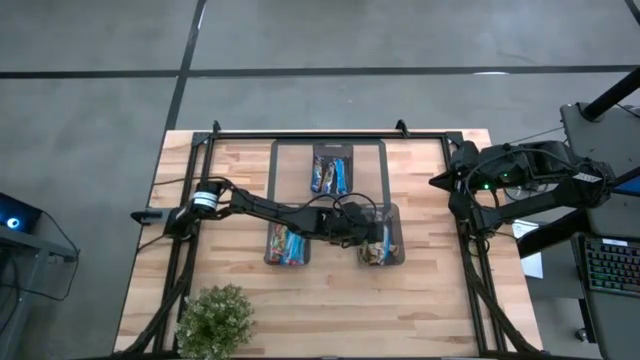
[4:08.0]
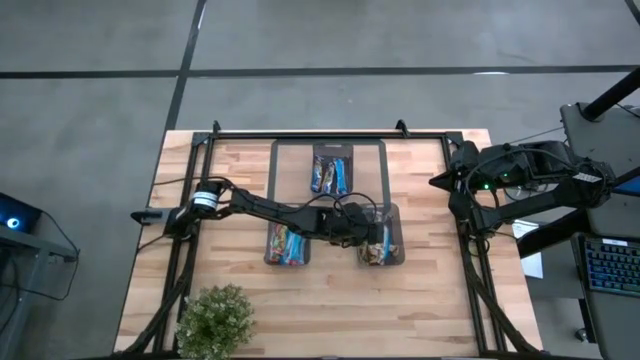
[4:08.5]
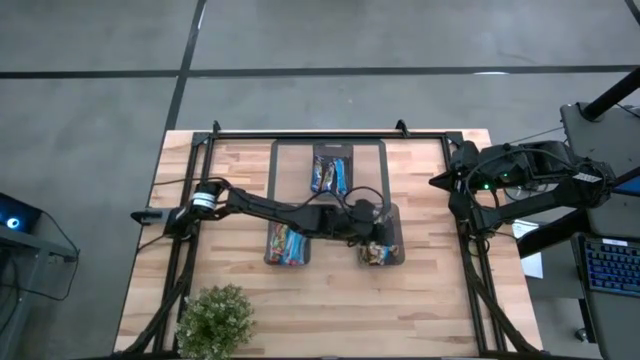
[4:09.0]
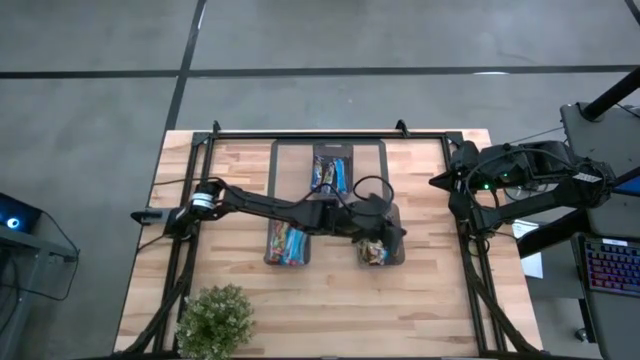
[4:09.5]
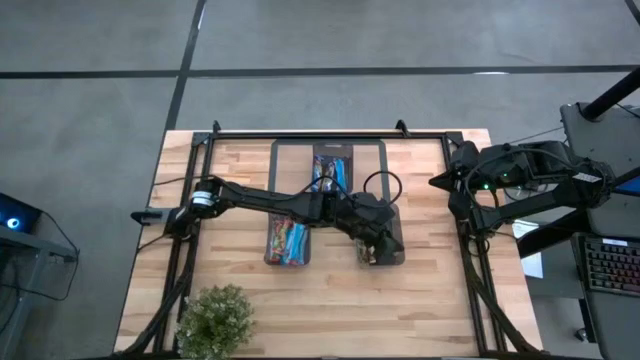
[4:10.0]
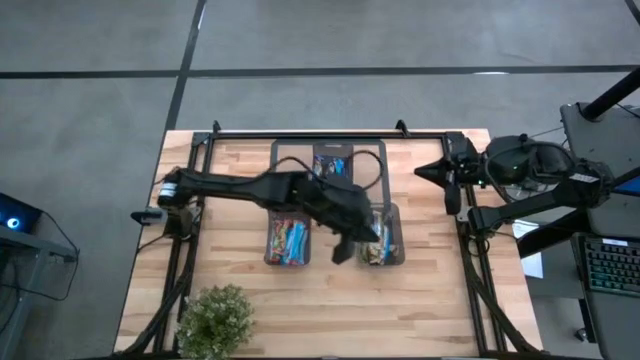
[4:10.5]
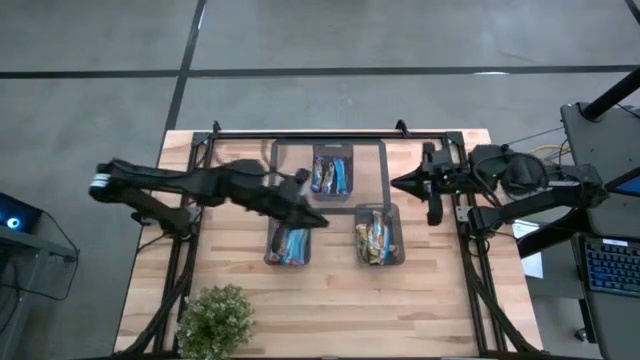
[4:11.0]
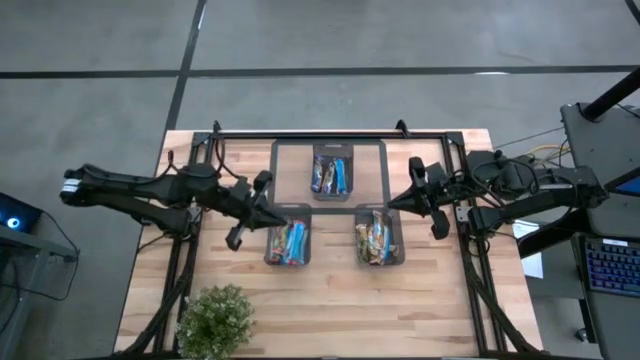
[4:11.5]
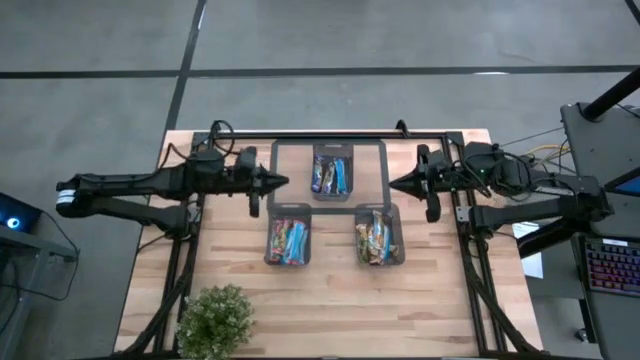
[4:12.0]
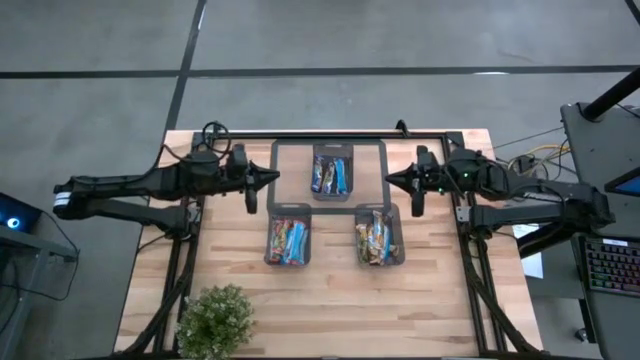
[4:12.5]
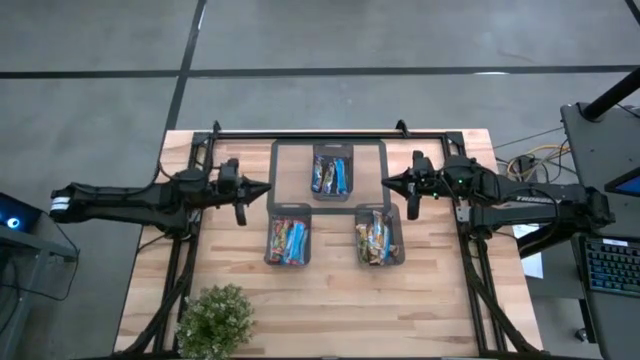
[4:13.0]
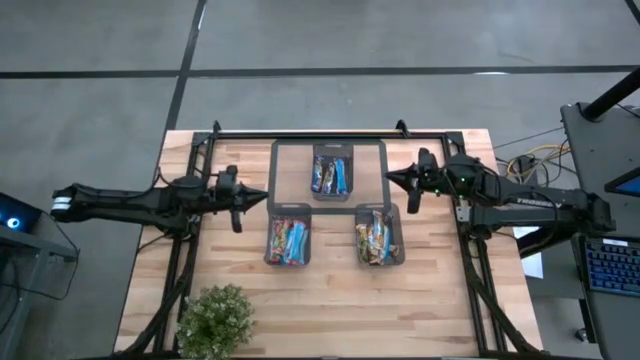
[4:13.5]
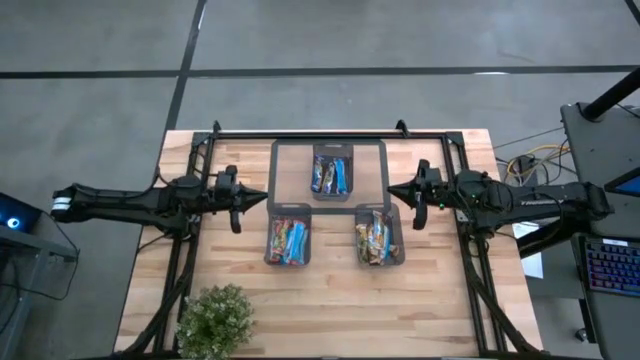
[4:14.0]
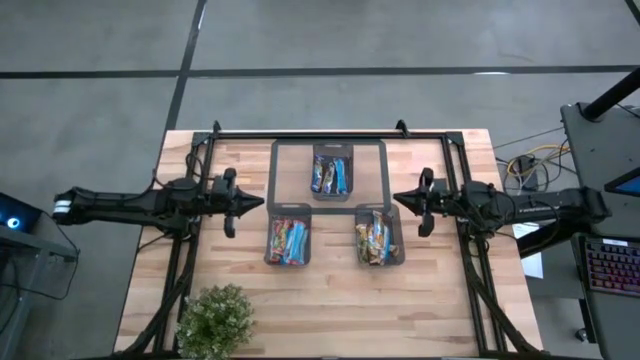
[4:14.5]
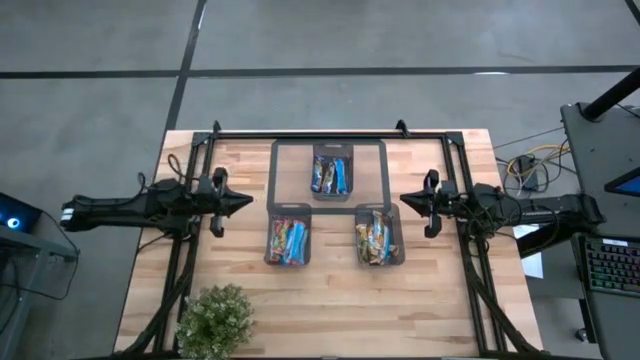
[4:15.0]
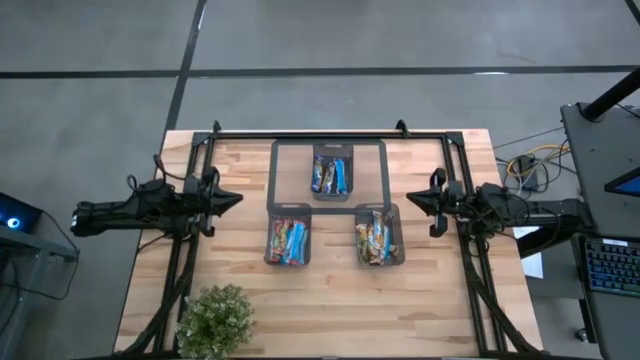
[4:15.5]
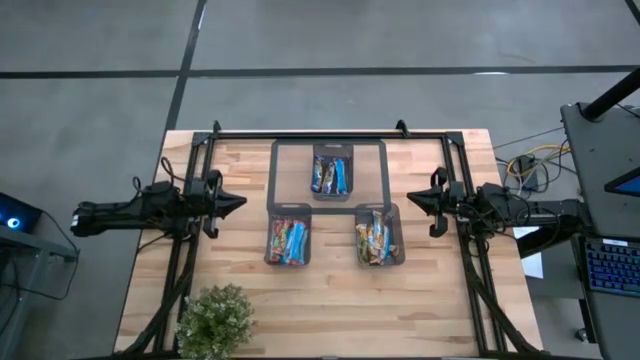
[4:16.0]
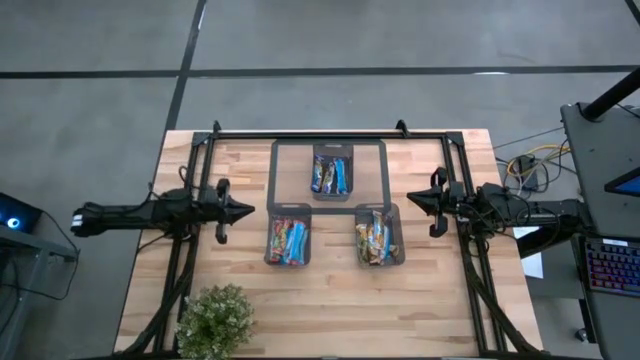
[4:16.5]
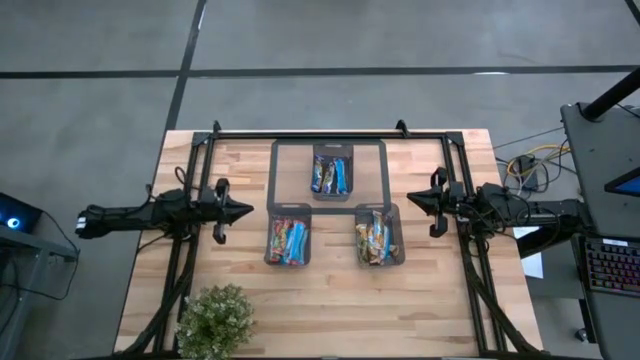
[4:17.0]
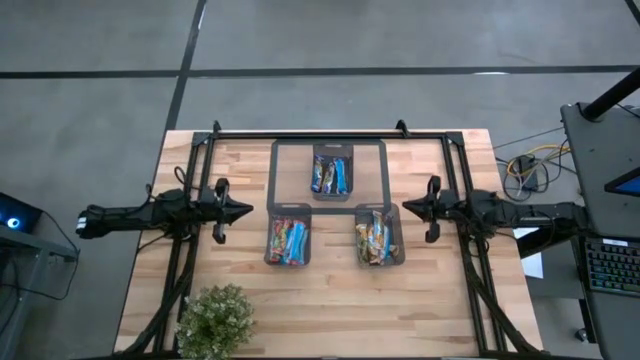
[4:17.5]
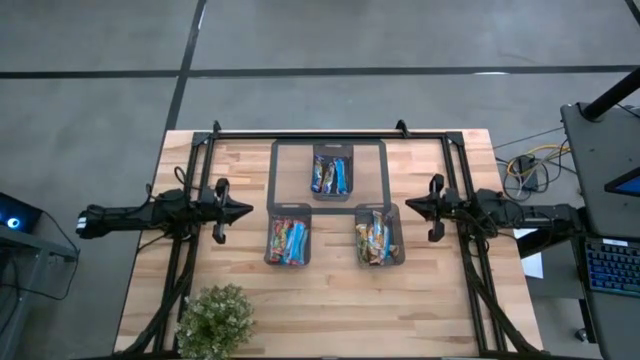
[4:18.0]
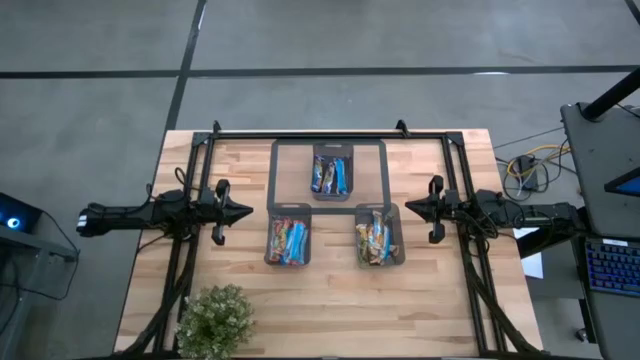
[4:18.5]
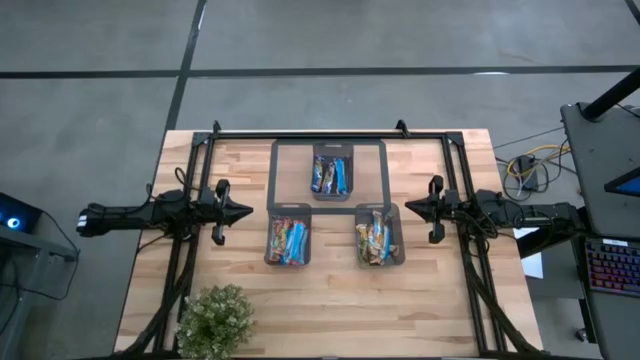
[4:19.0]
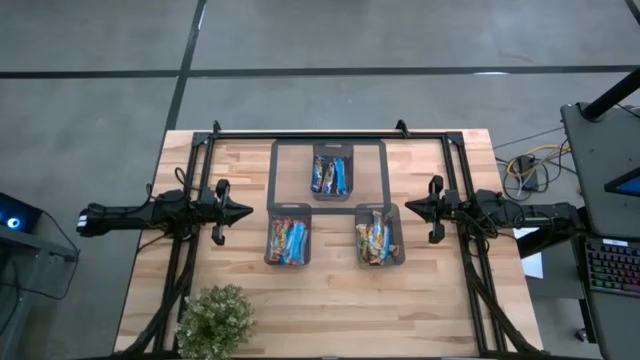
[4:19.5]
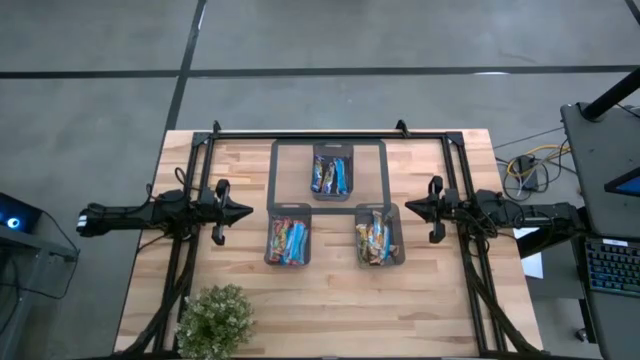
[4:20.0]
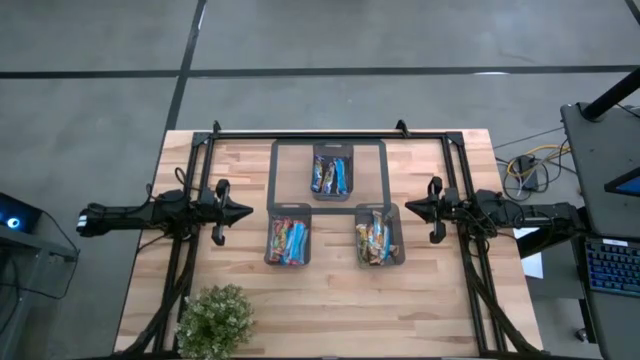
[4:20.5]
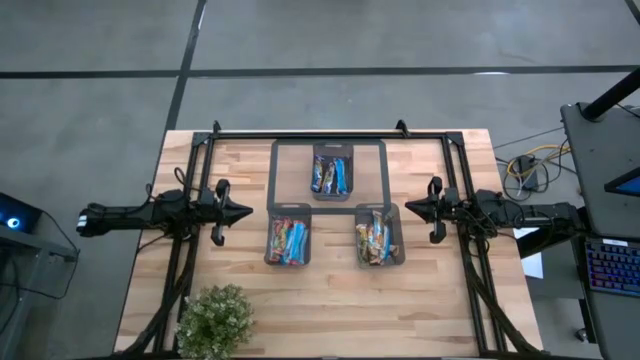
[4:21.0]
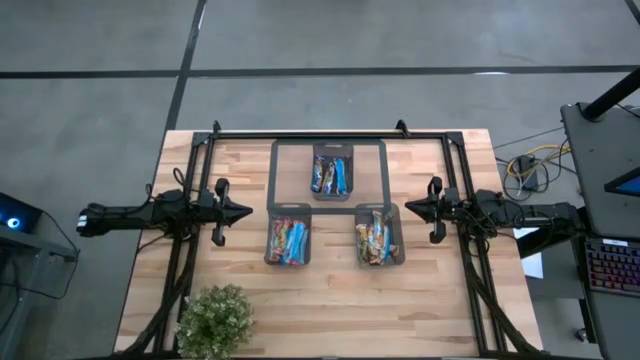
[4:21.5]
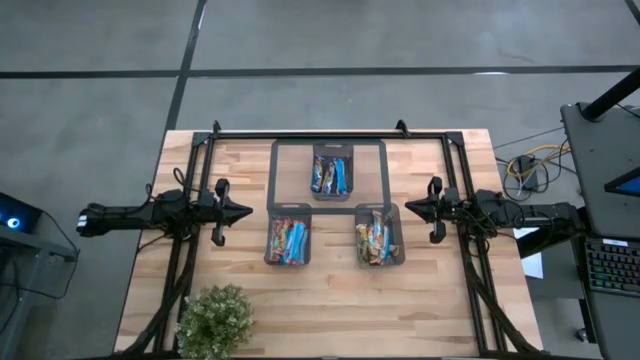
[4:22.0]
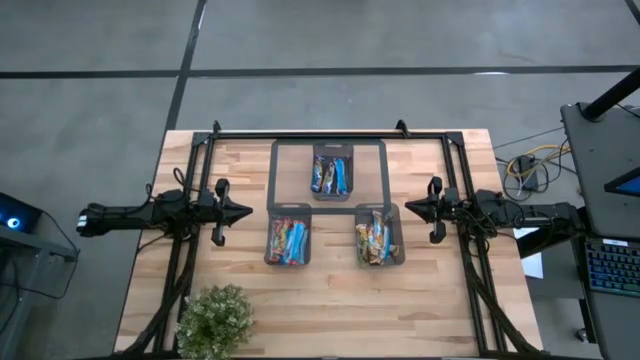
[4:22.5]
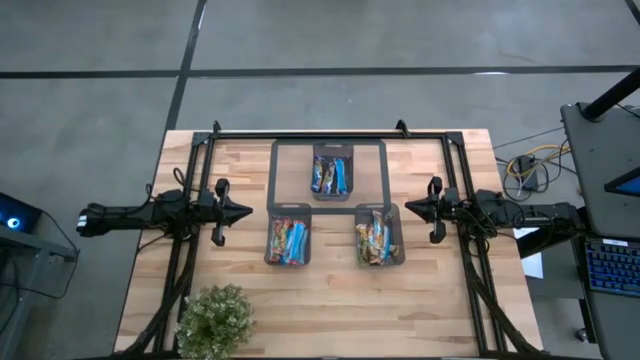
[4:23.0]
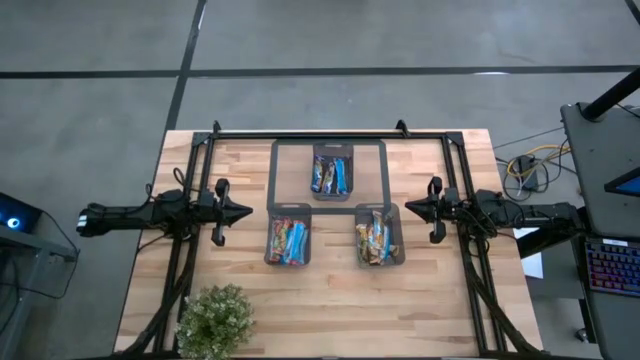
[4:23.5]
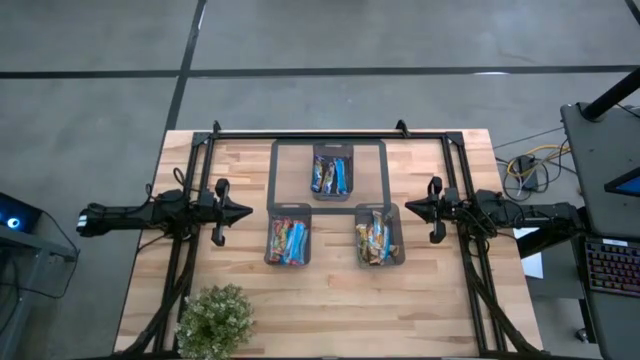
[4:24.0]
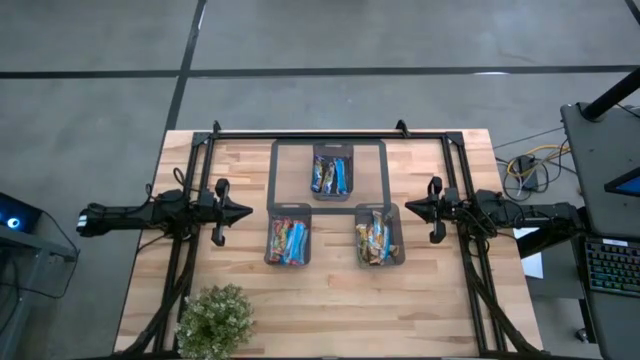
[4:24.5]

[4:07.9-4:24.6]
Task: Pick and place Granola Bars by type
Return to Home Position

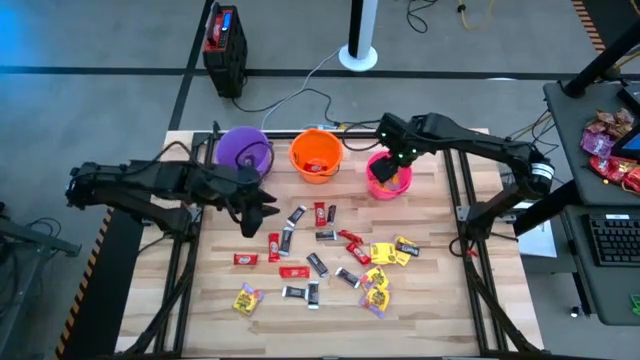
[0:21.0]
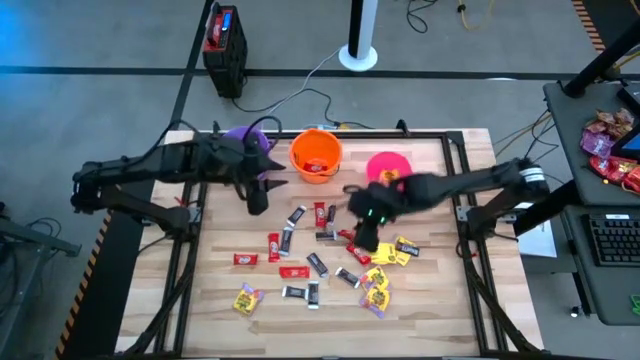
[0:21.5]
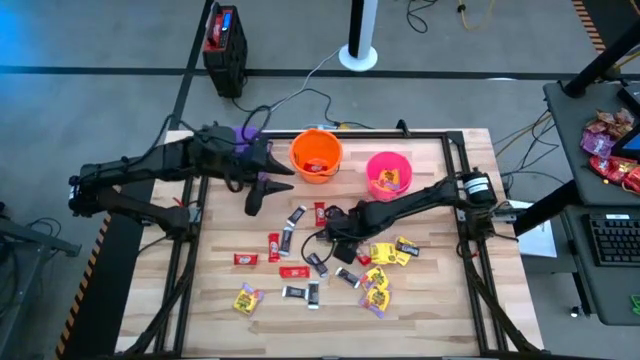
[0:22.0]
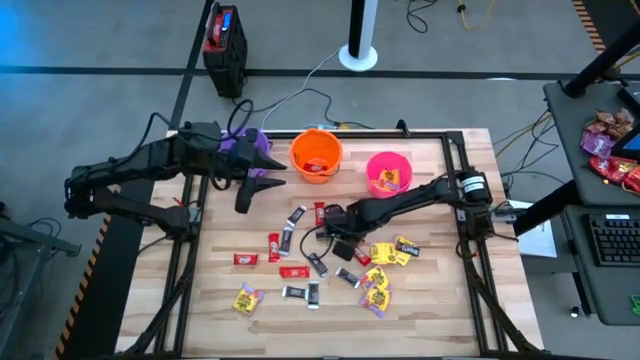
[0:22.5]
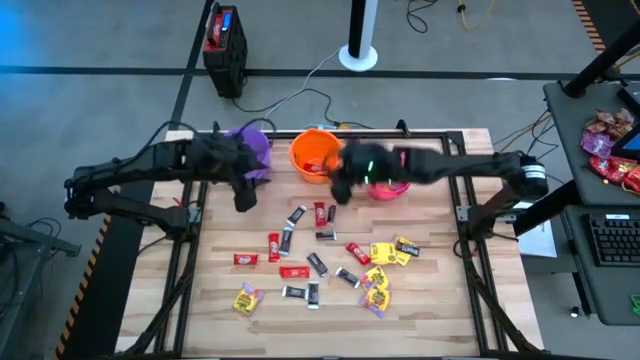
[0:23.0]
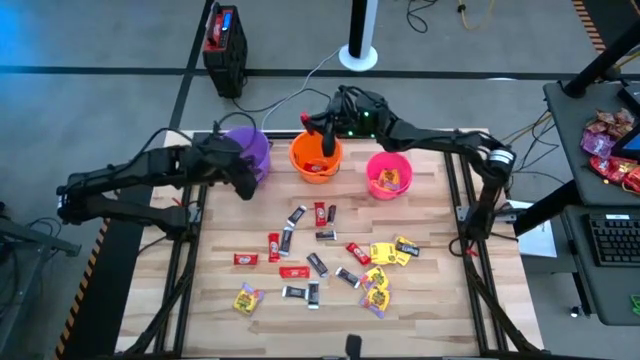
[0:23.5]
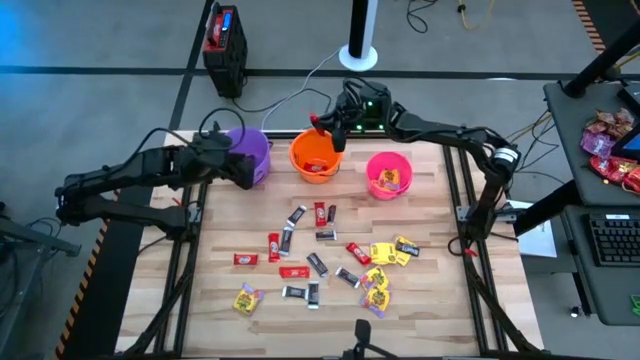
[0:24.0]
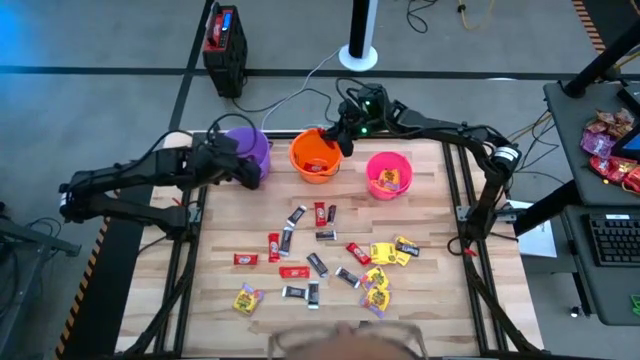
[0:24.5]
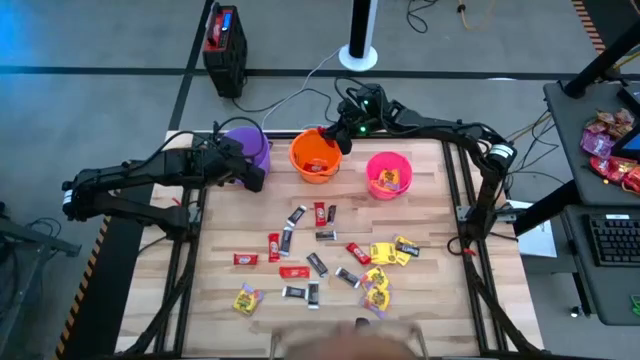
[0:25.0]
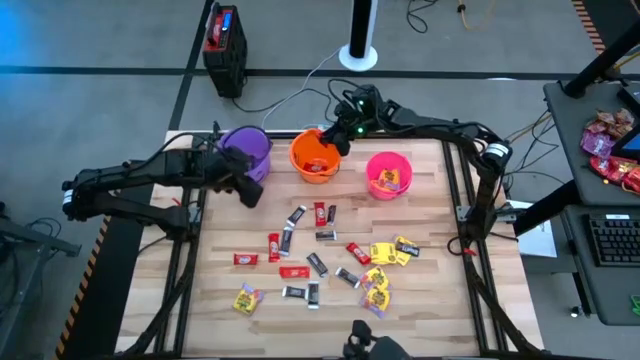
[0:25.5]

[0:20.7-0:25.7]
Task: Sort candy by brand, put in halloween buckets
Put the red candy into the orange bucket
